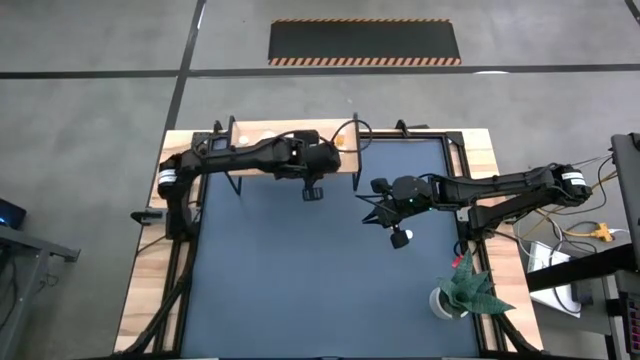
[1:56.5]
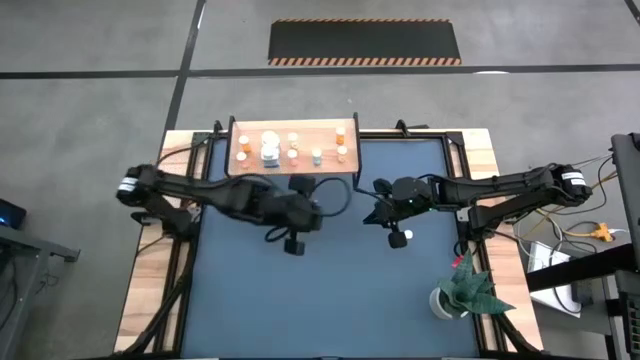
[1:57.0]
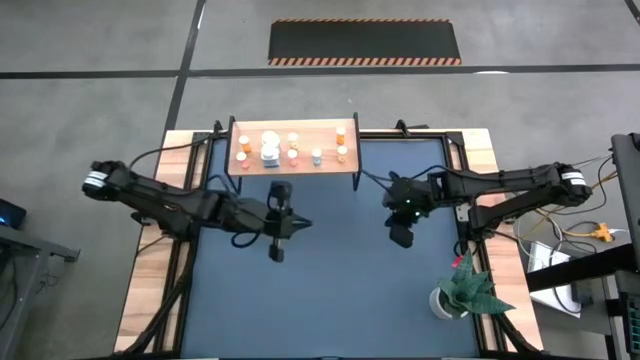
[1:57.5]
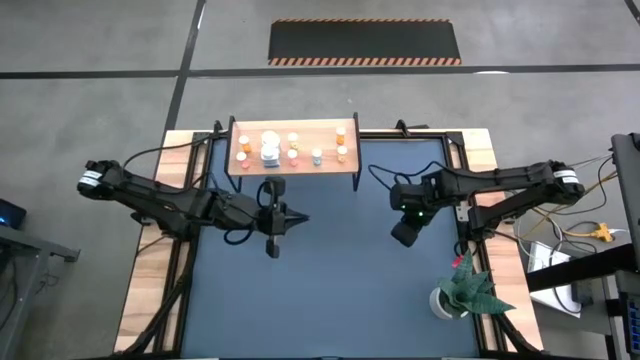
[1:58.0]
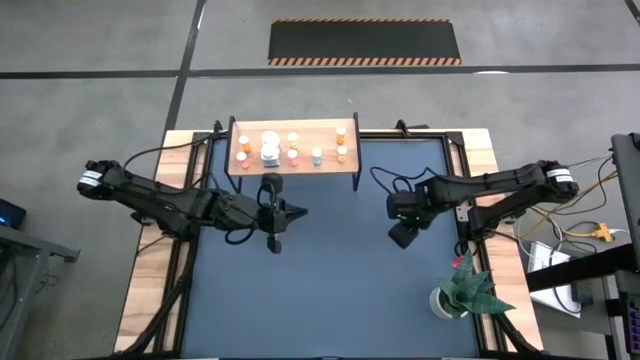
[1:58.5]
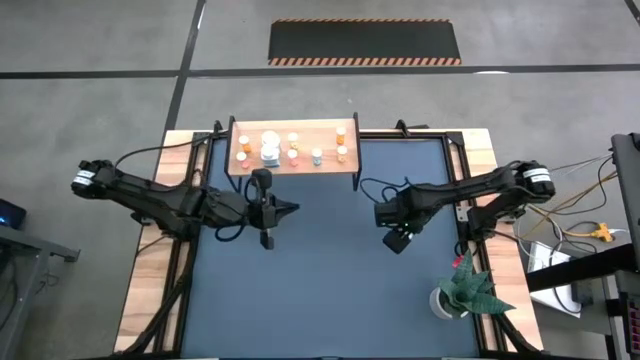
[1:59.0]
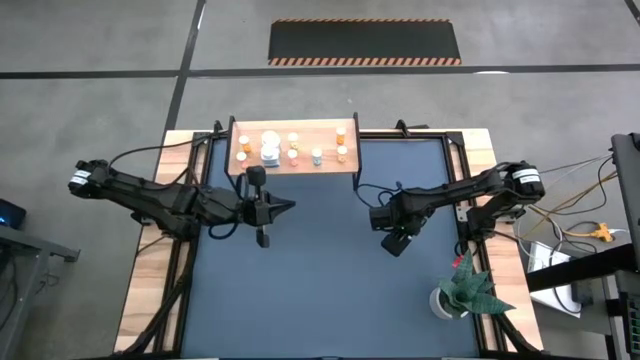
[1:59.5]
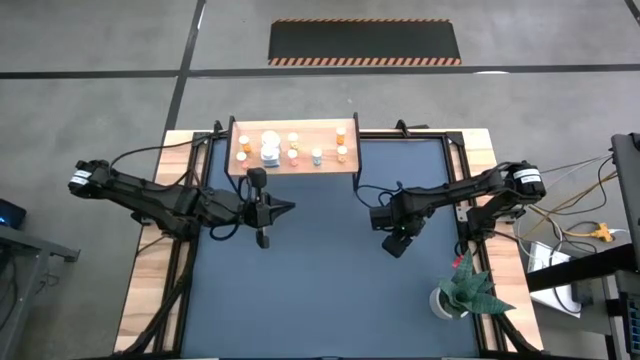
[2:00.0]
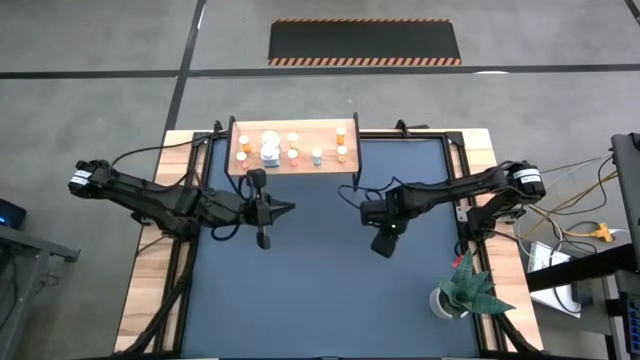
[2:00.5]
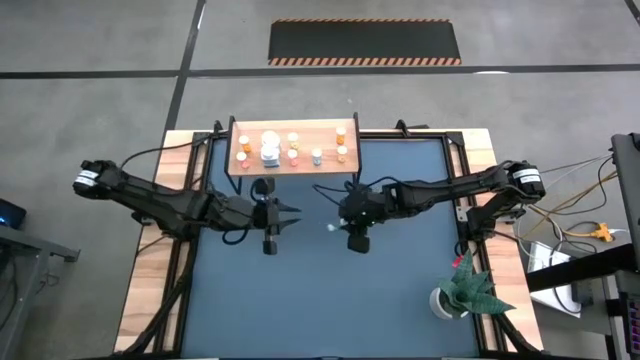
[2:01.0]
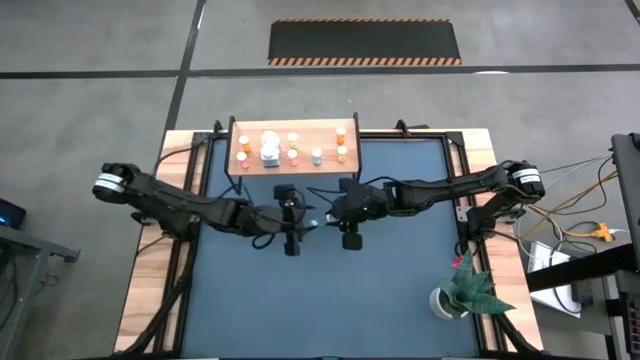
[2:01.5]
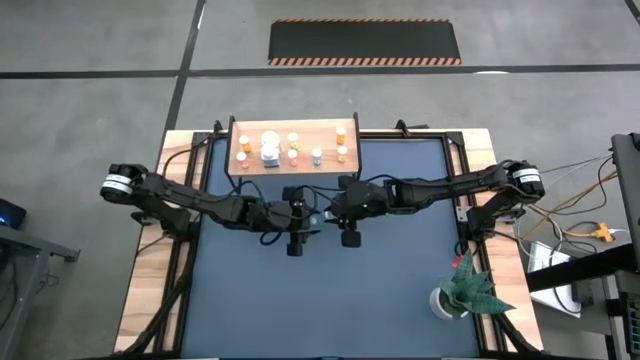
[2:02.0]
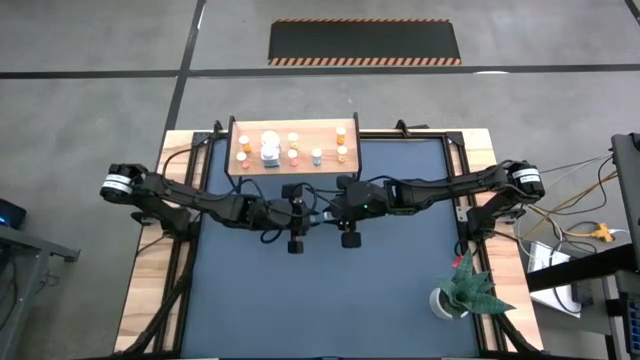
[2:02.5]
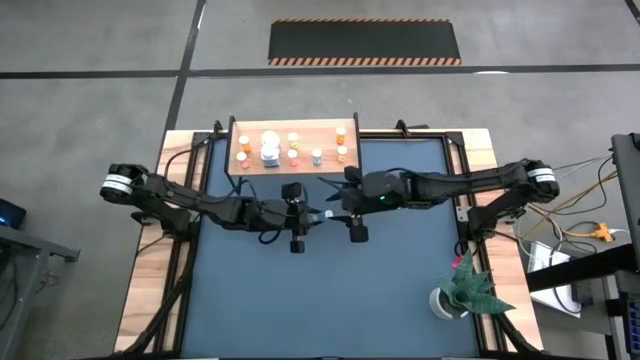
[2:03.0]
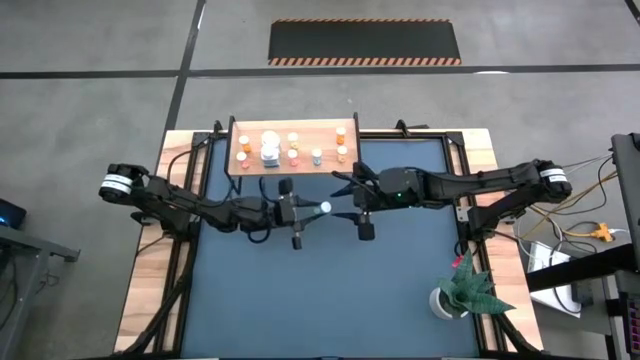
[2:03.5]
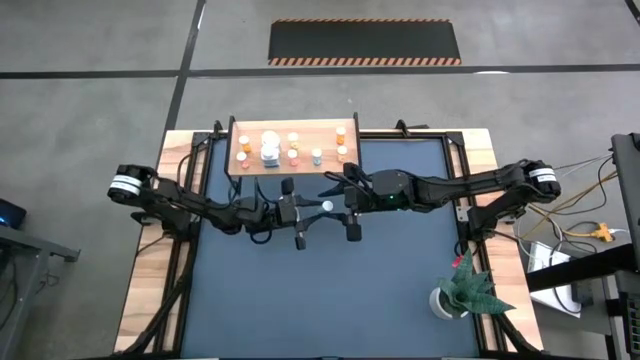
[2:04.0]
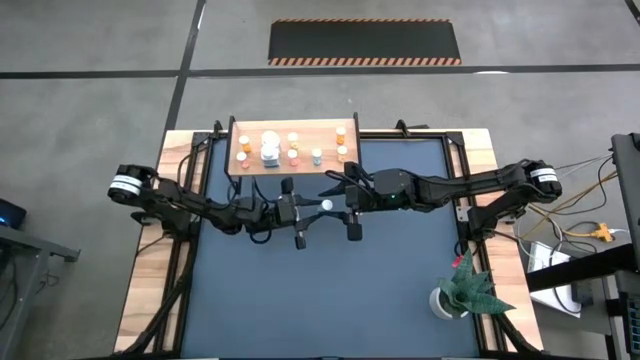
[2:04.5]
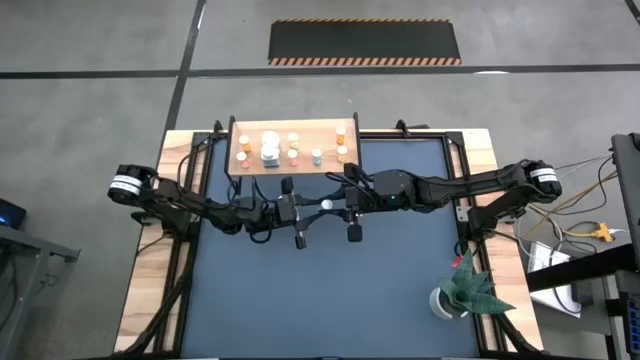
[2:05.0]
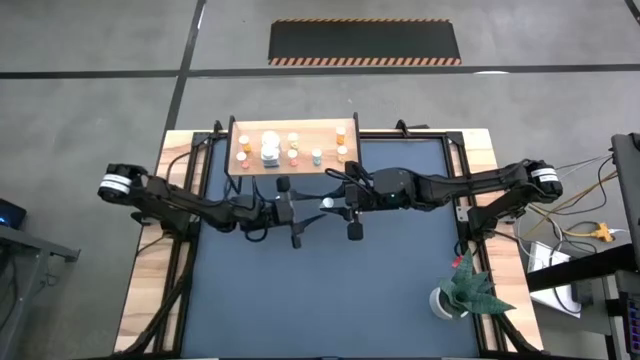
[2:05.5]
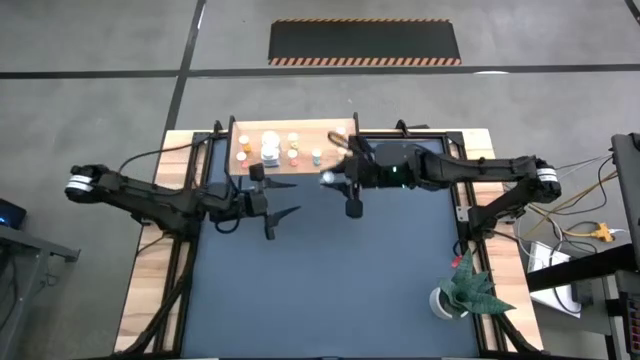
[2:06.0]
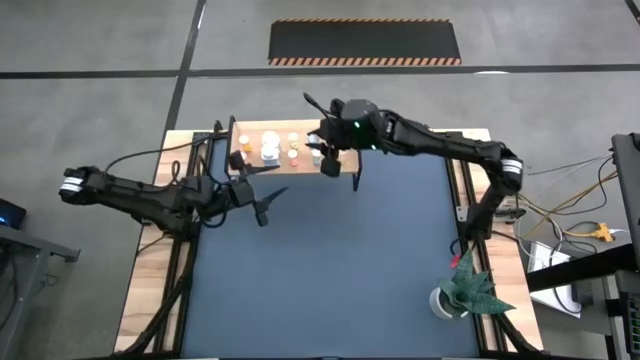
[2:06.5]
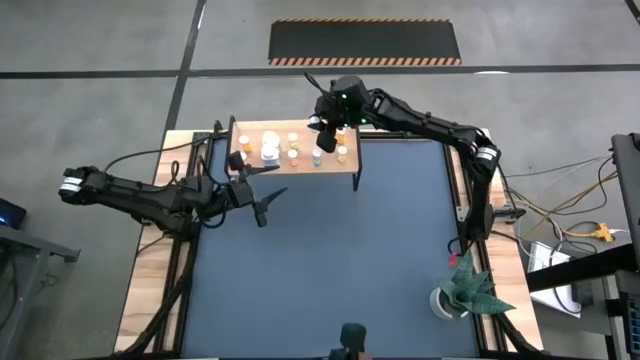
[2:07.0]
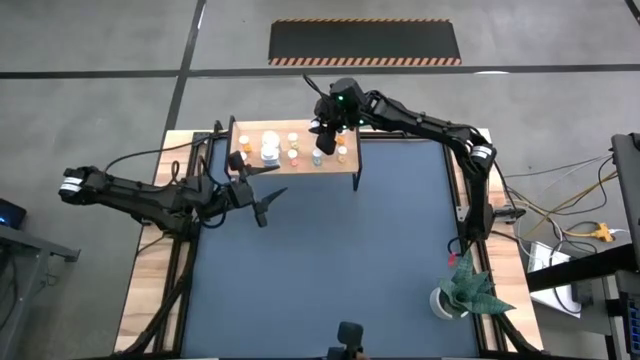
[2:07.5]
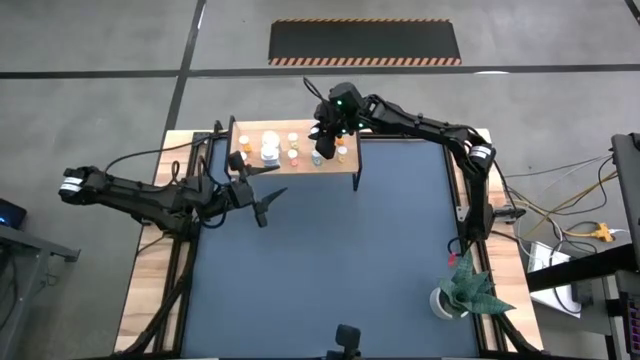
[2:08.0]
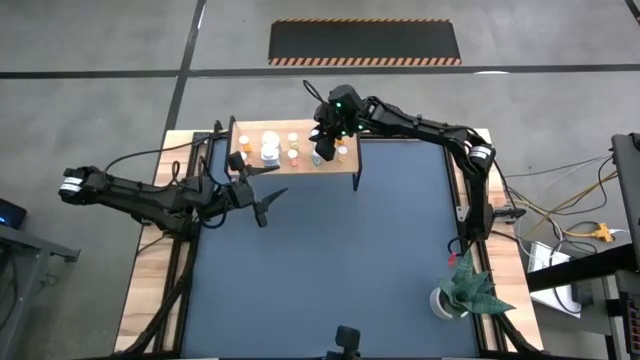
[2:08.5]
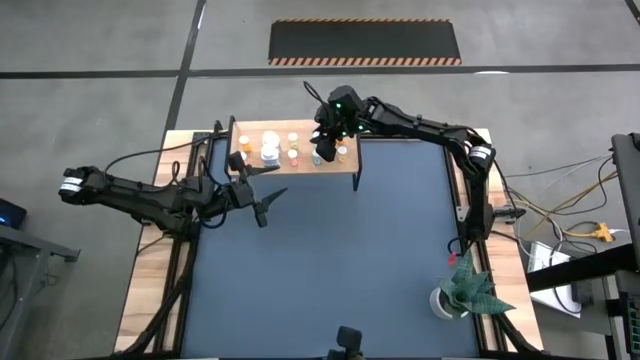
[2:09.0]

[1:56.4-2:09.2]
Task: Pick and place medicine bottles onto shelf by color
Put the blue pill bottle on the shelf

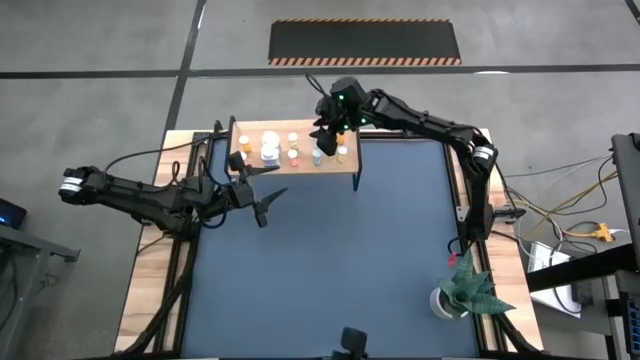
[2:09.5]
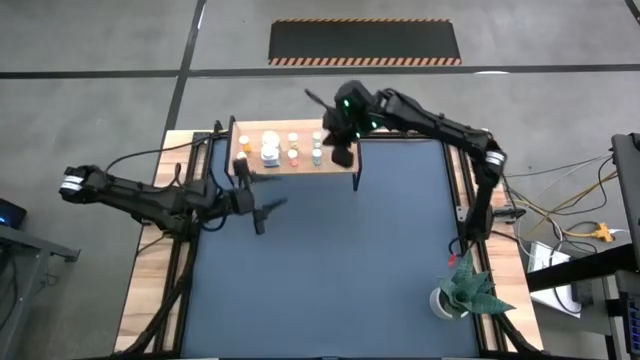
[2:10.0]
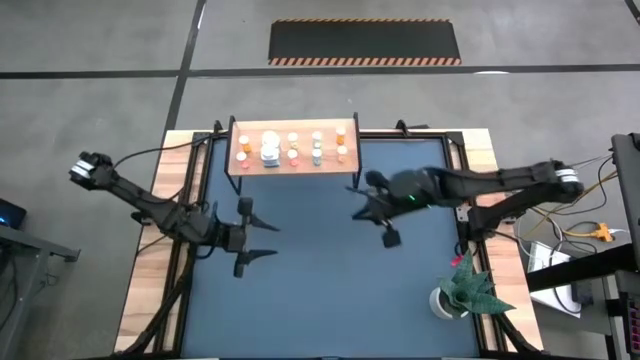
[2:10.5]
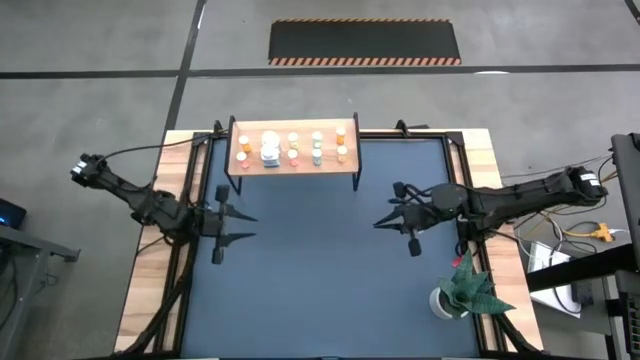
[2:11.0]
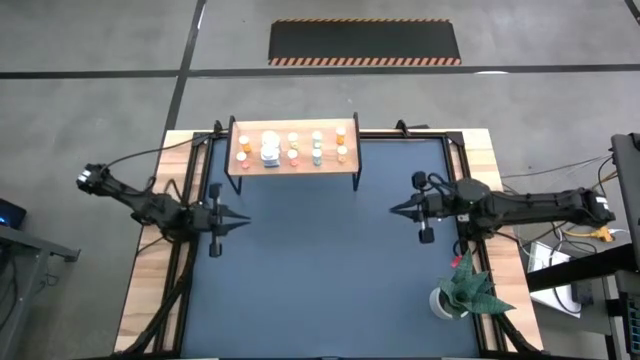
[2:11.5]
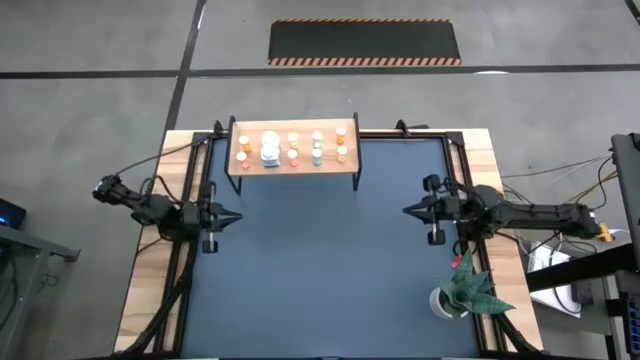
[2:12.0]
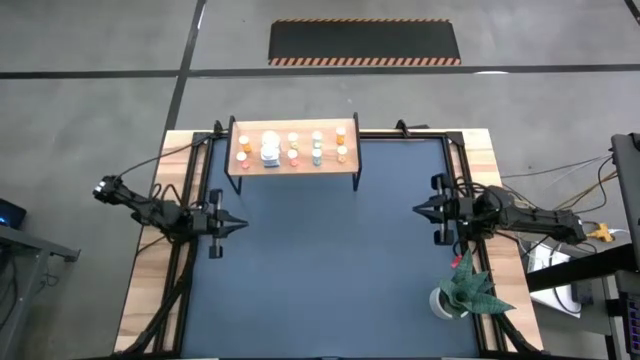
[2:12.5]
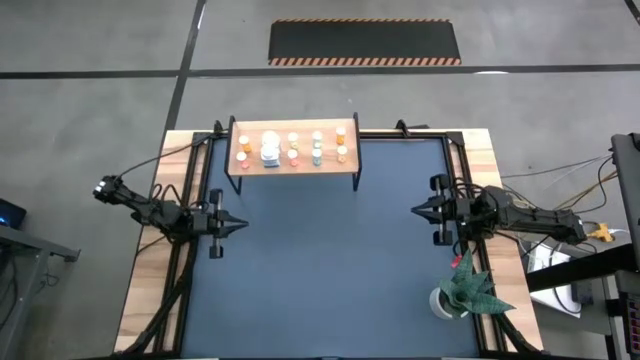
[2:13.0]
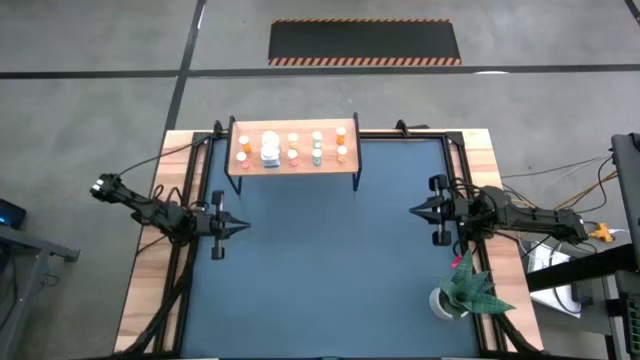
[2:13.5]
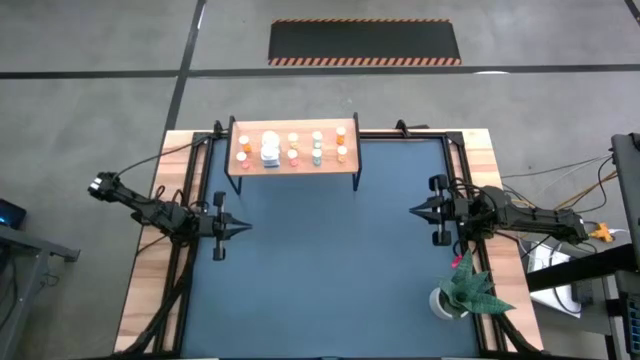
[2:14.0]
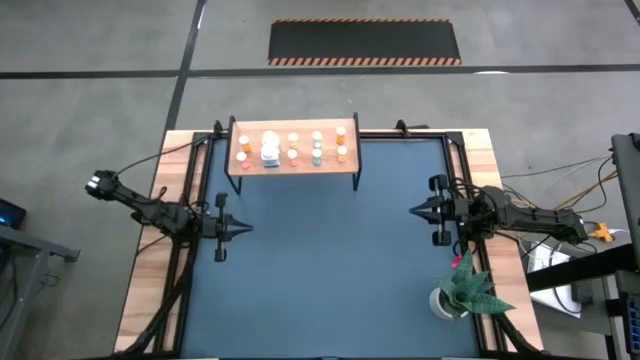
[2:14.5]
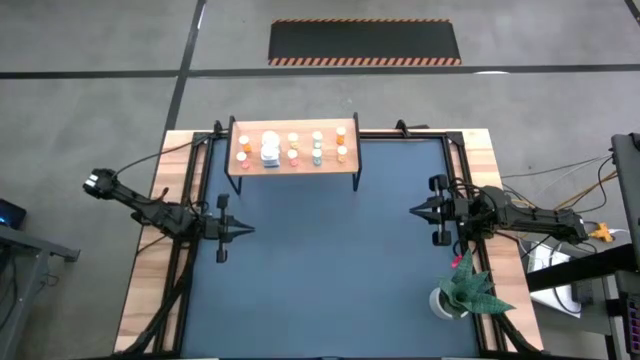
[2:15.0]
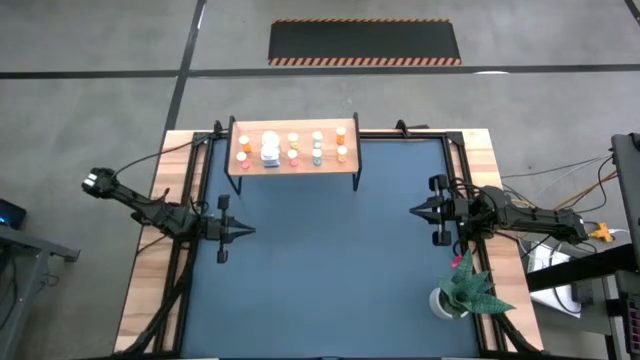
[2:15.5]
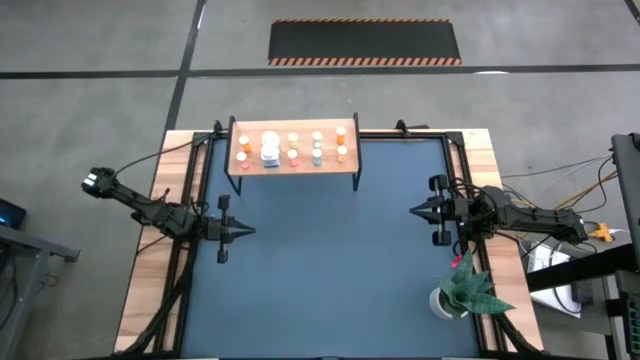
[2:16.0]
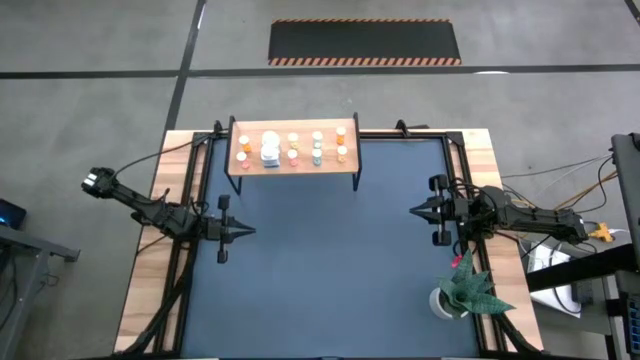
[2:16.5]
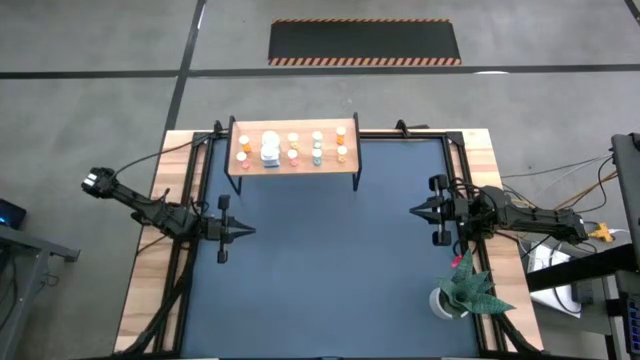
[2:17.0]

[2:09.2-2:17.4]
Return to Home Position
